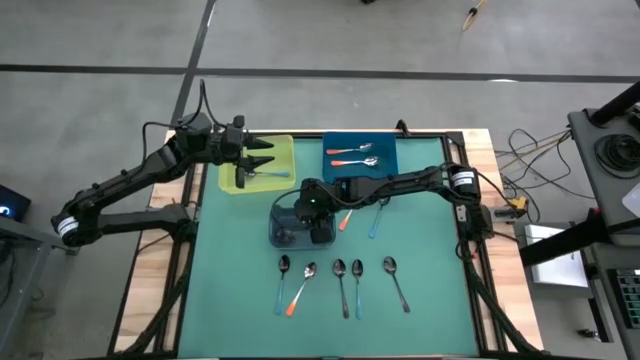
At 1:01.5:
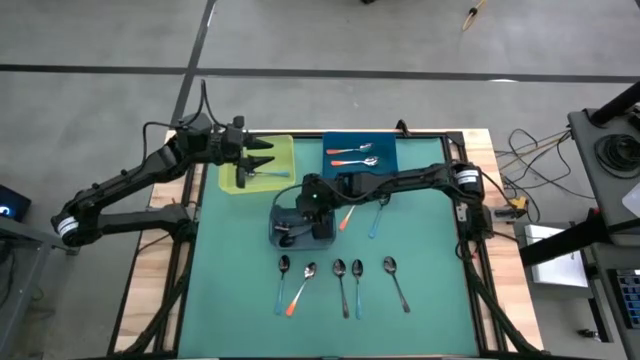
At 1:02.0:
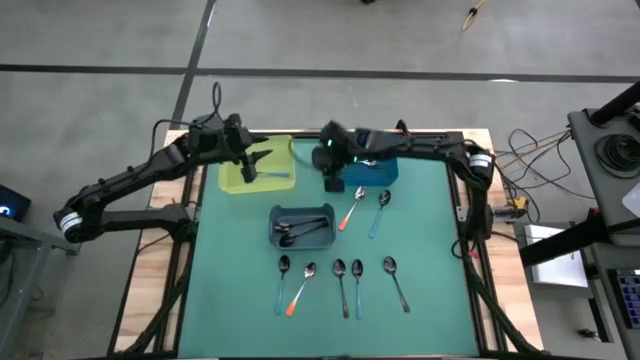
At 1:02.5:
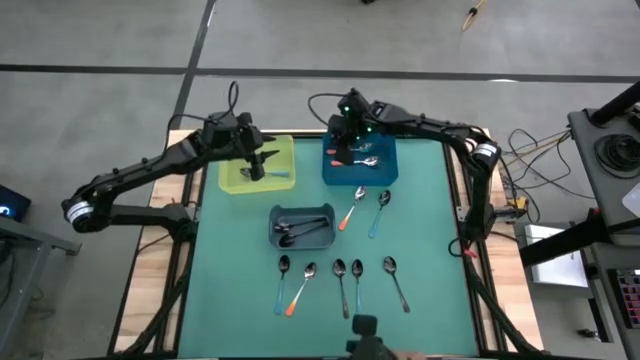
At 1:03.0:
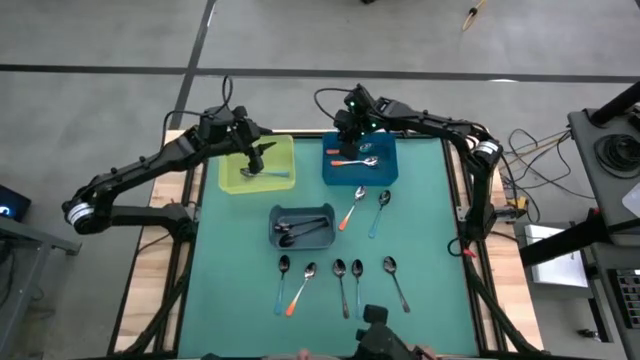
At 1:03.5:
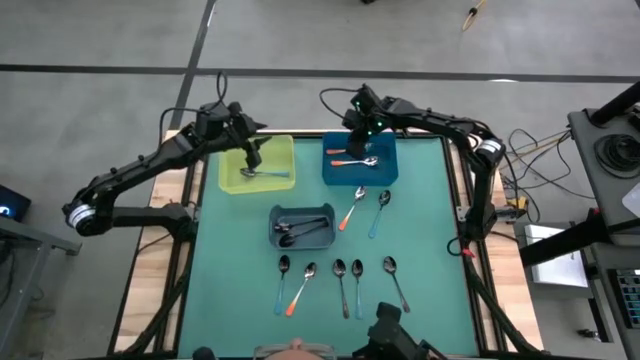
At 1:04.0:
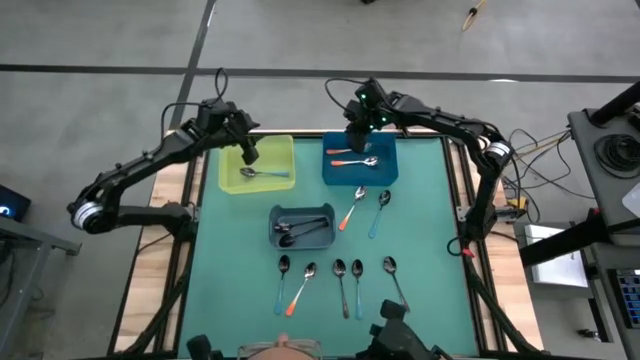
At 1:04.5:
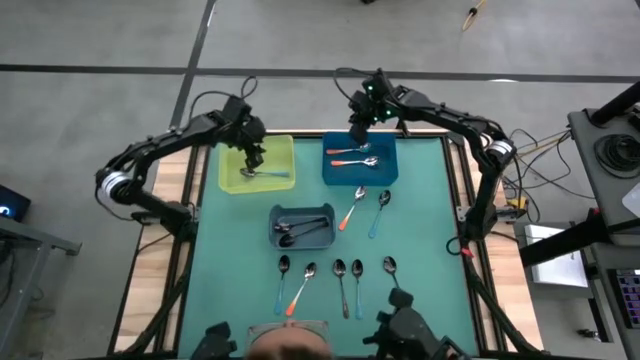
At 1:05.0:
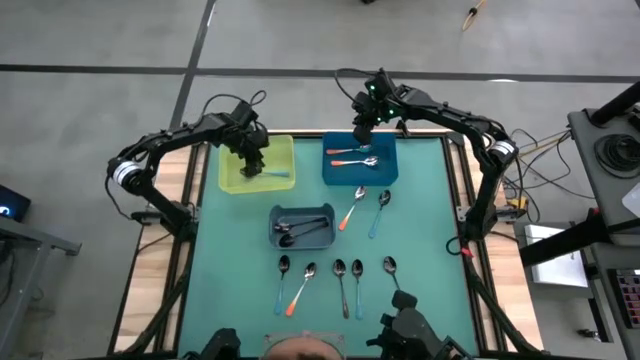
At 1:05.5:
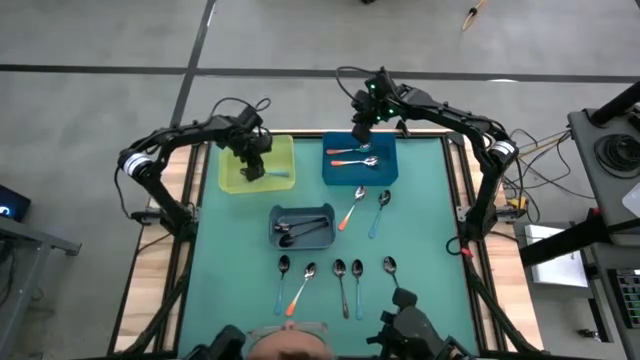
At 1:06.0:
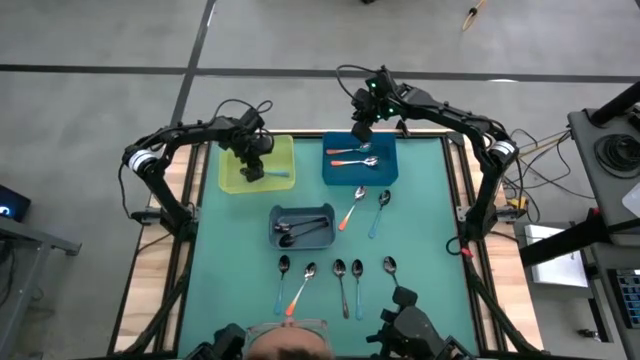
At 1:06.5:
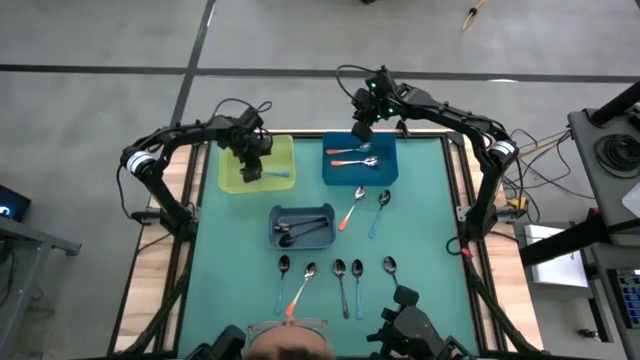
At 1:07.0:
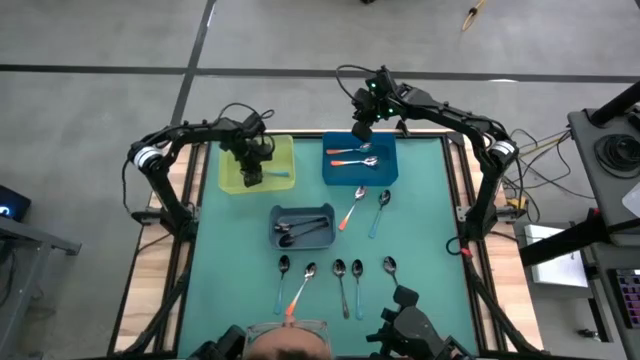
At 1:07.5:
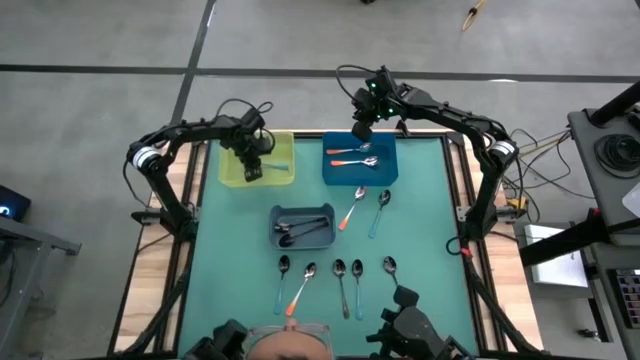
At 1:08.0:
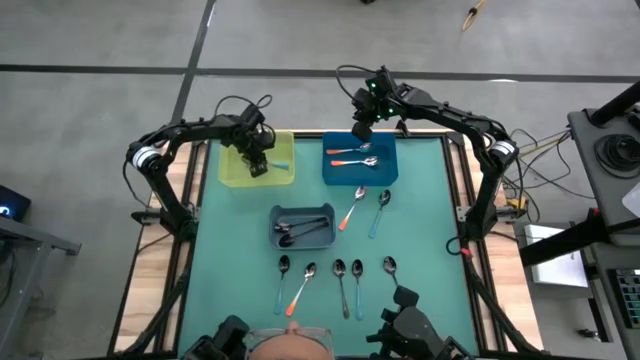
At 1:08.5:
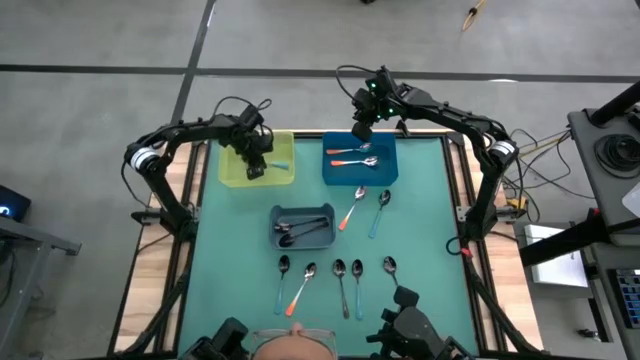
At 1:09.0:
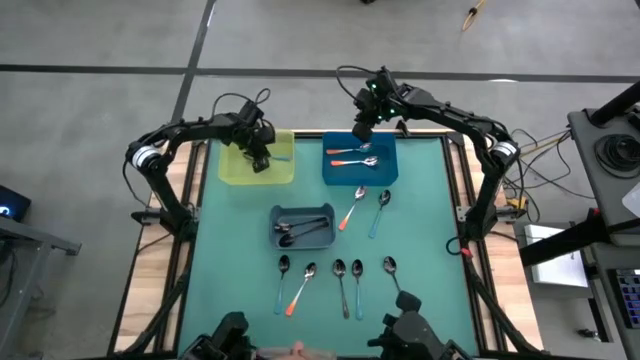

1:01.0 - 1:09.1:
Task: Sort silverware by color (type)
Adjust the blue spoon in the green bin

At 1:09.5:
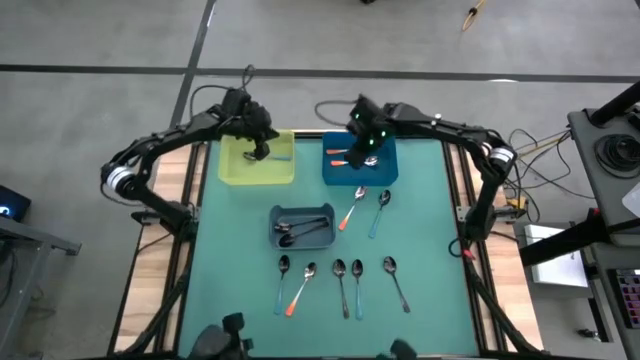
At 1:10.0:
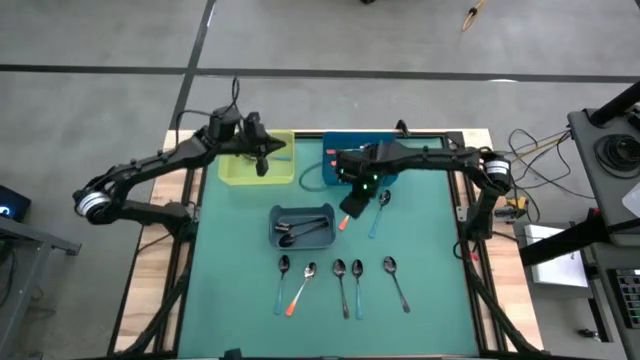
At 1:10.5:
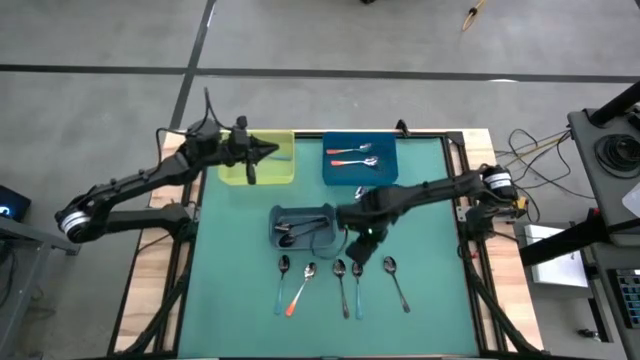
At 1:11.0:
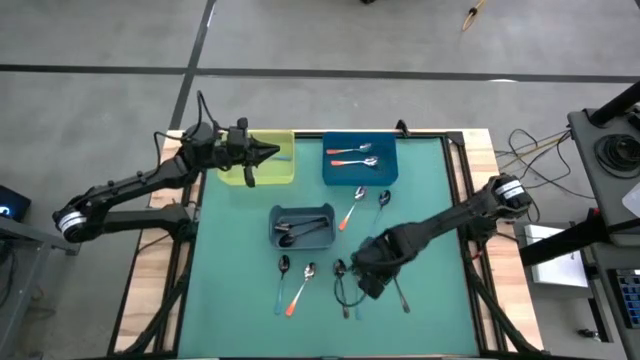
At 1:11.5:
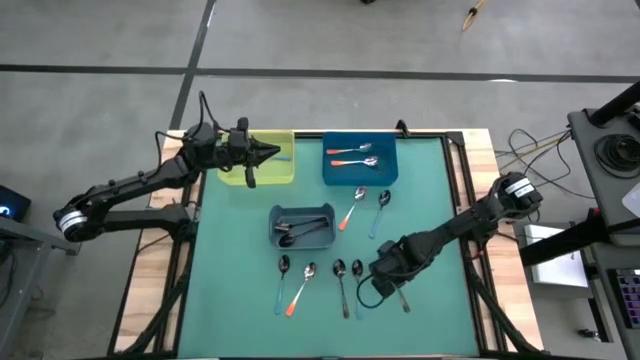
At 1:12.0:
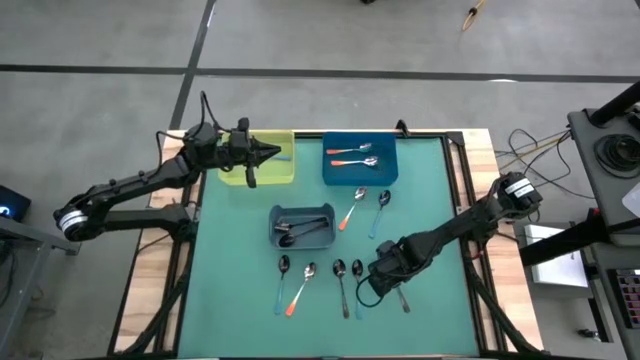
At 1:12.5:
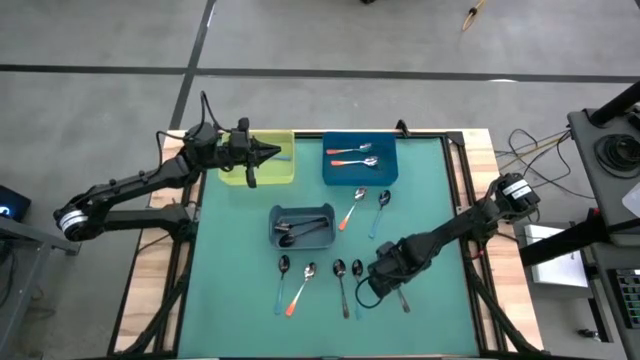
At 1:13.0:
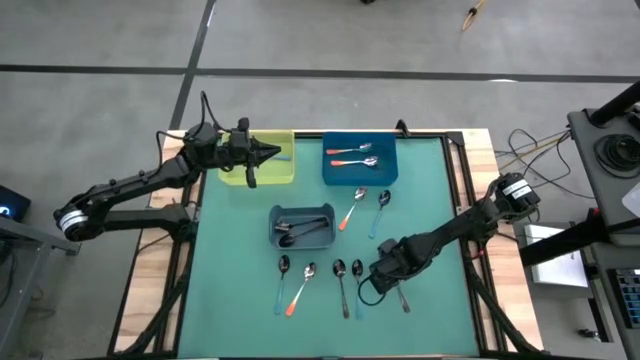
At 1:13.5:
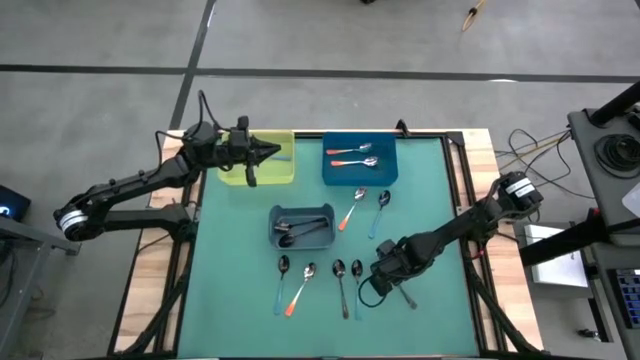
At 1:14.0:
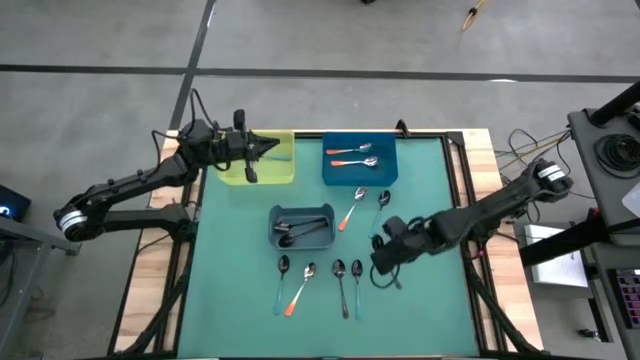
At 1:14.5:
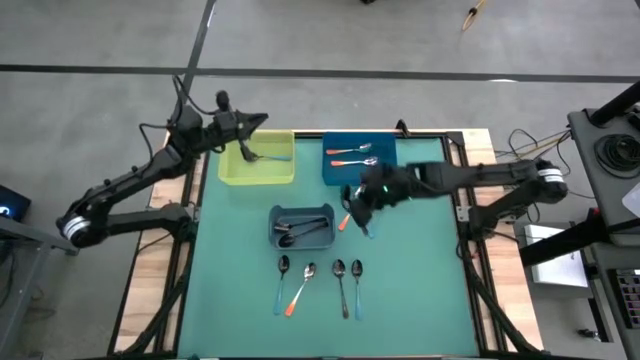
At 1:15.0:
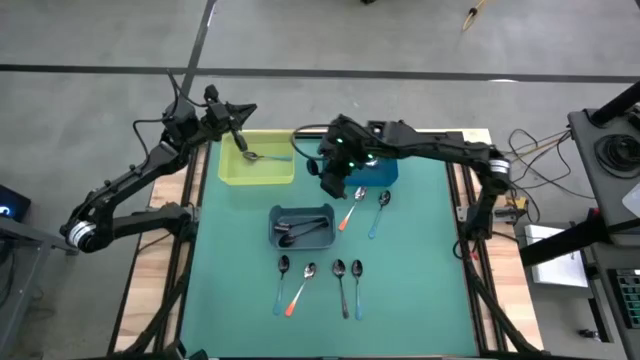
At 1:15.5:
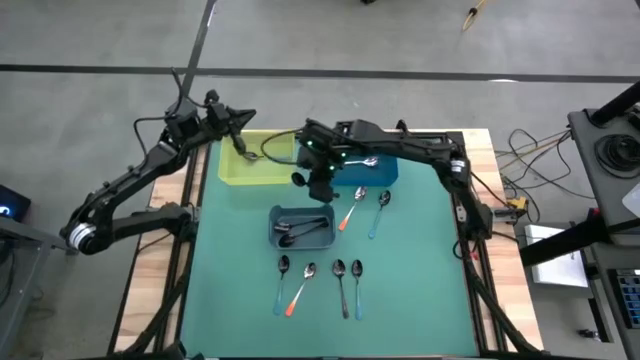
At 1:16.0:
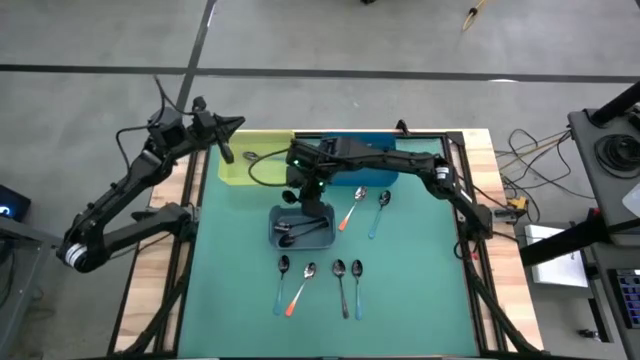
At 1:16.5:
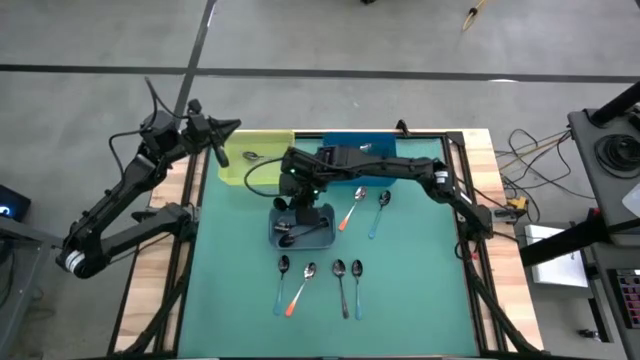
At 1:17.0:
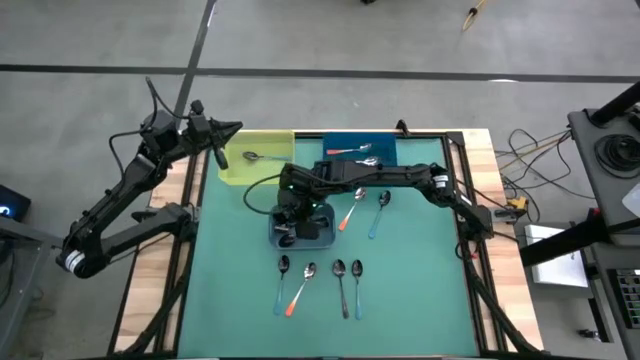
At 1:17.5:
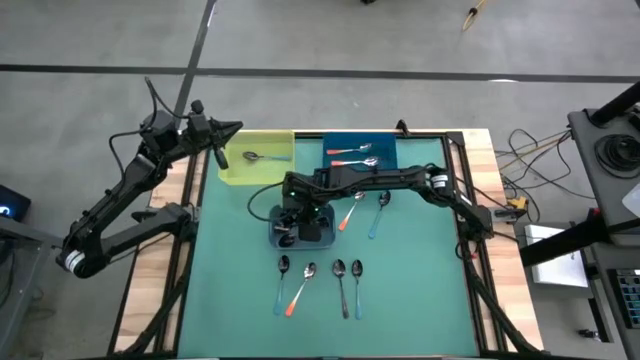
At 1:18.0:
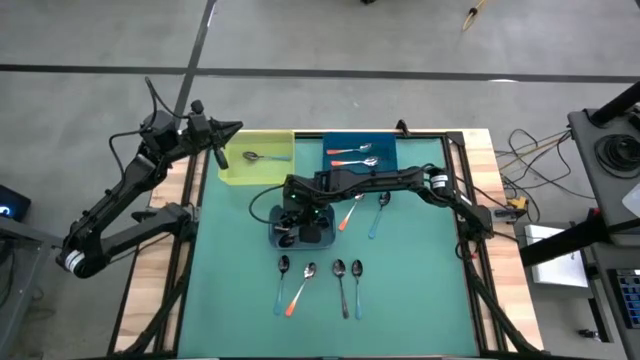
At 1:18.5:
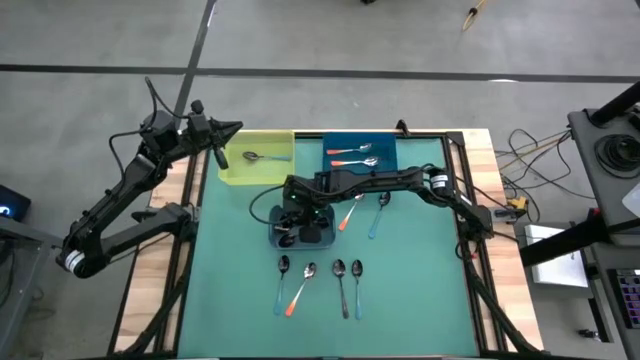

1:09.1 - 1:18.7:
Put the black spoon into the gray bin

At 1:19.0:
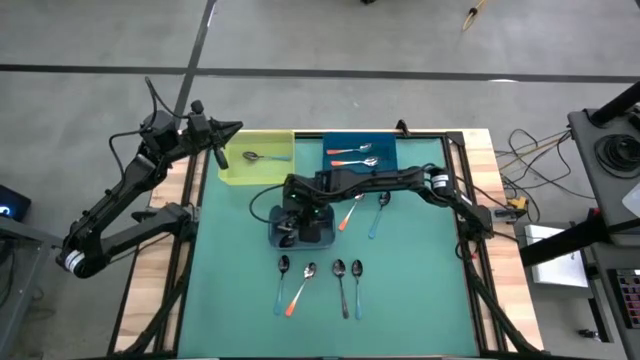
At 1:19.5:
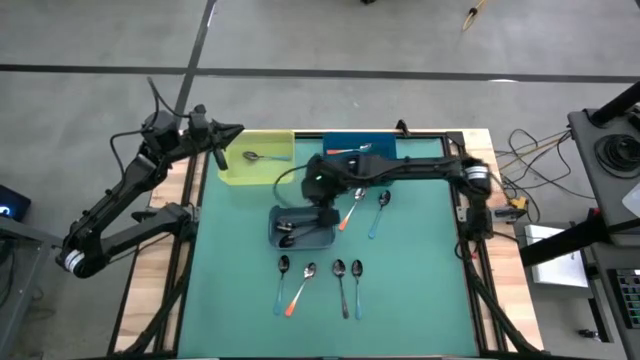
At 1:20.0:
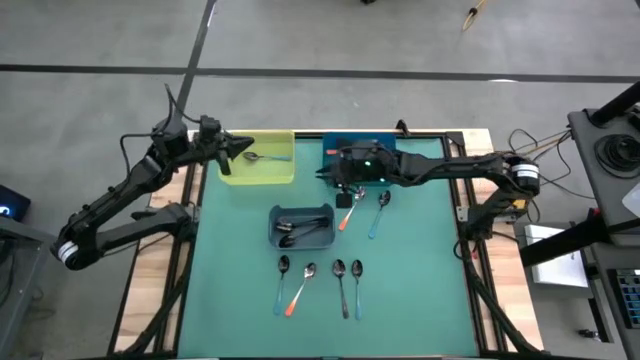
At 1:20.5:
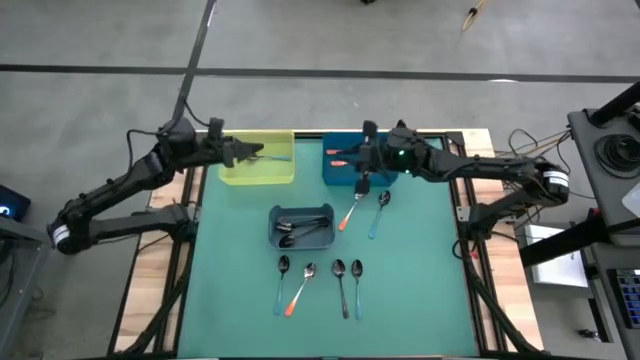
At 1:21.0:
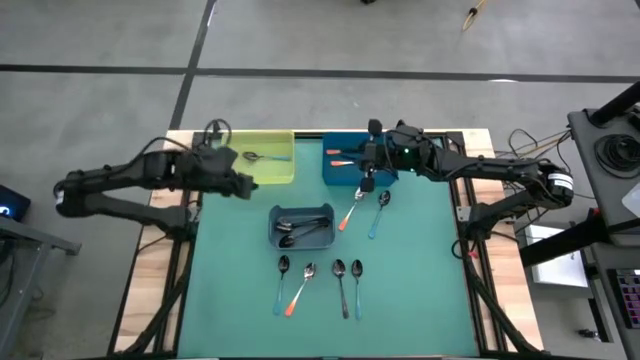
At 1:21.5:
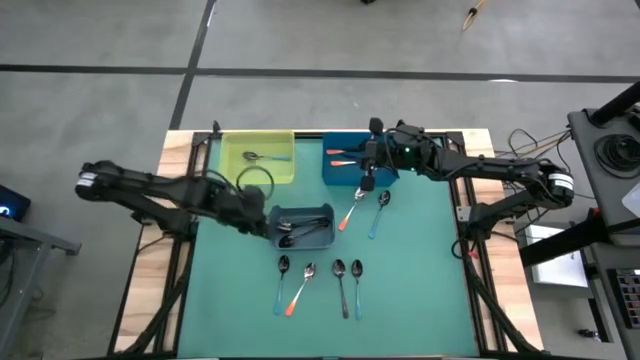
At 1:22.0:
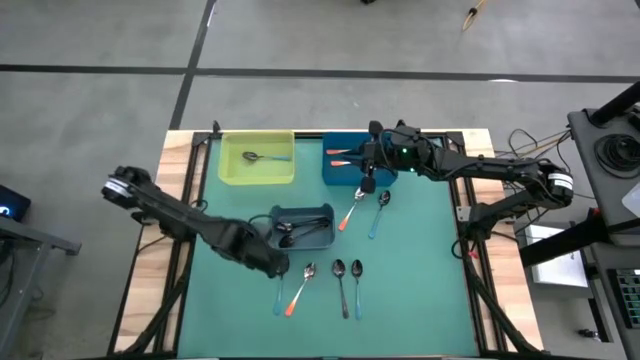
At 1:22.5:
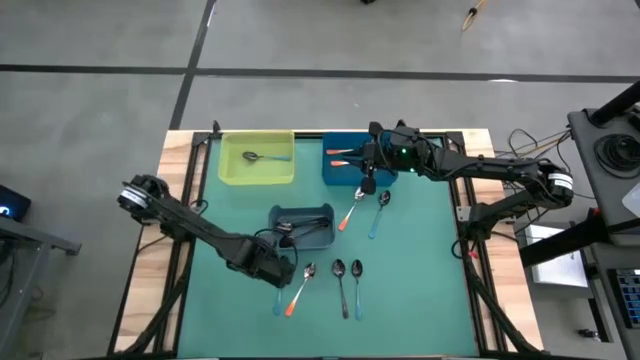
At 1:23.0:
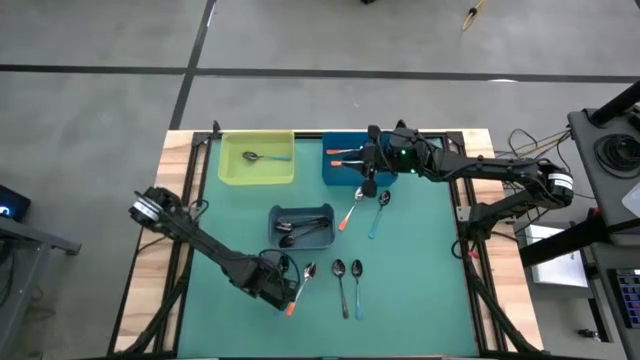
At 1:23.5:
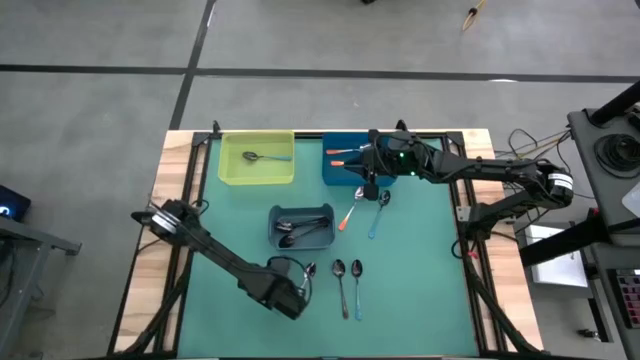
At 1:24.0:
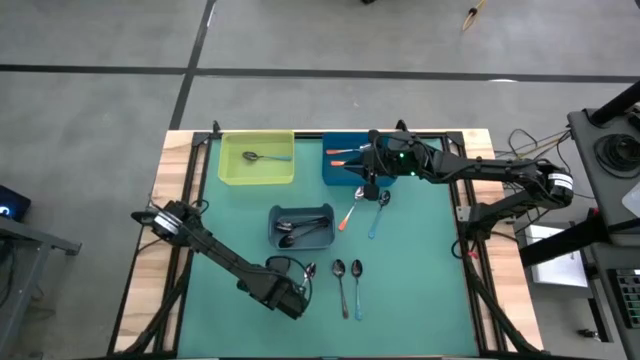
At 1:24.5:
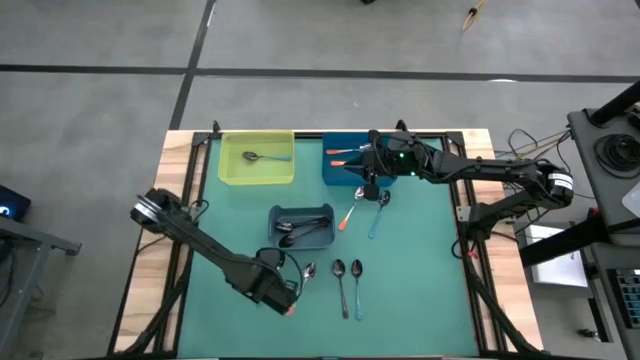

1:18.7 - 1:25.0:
Put the blue spoon into the green bin
